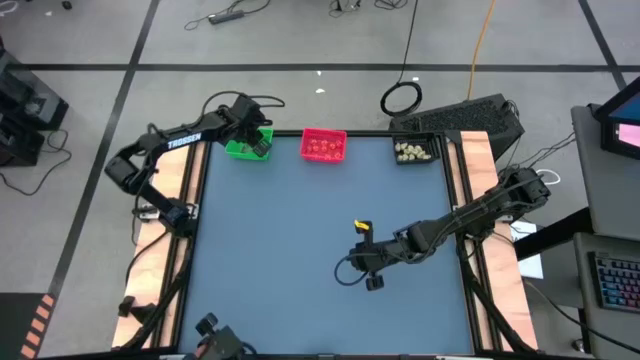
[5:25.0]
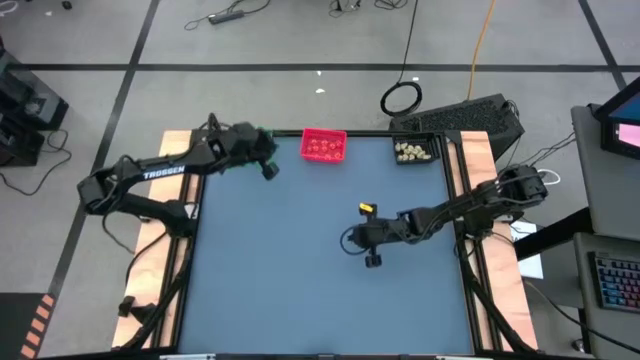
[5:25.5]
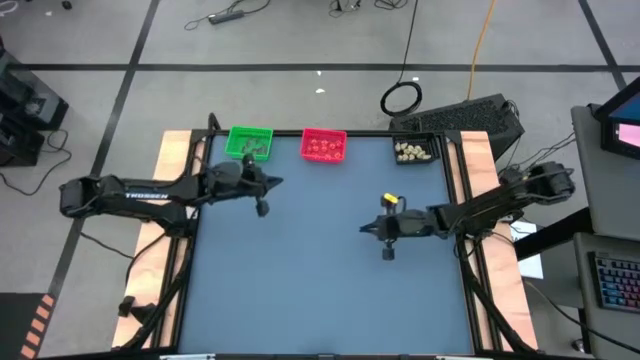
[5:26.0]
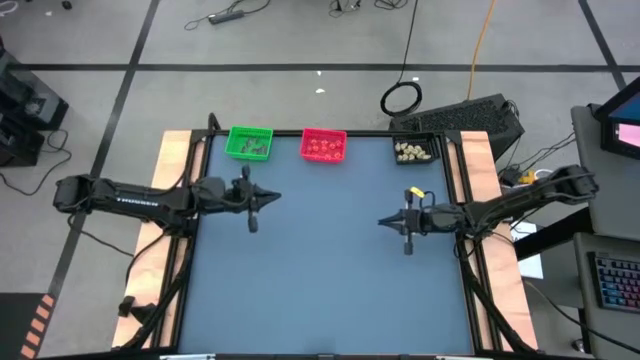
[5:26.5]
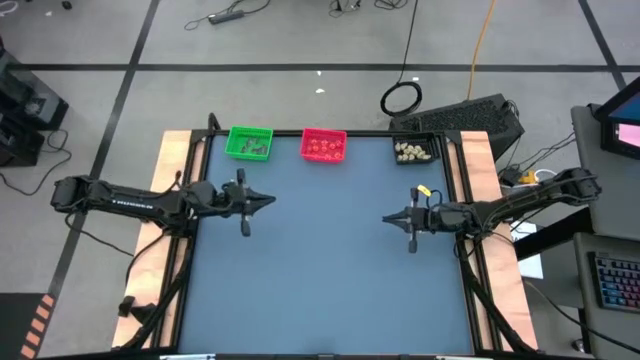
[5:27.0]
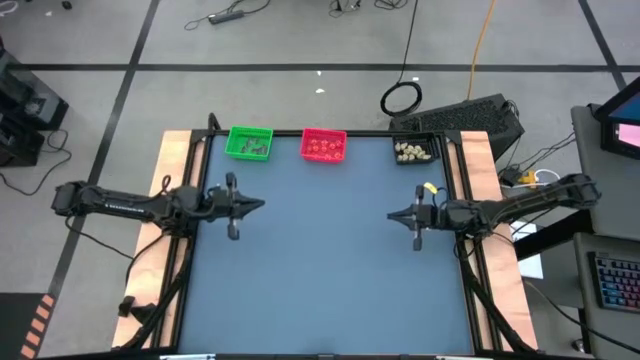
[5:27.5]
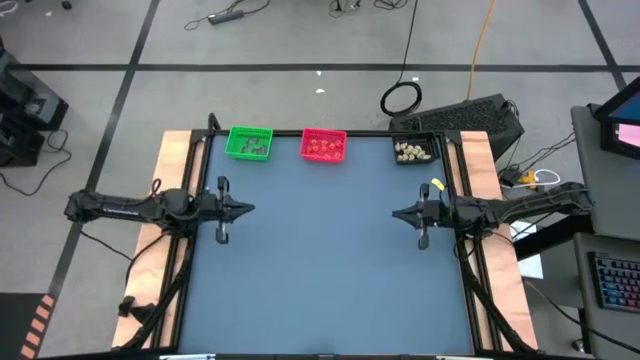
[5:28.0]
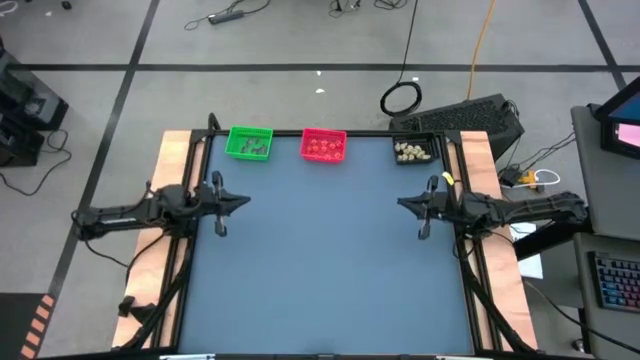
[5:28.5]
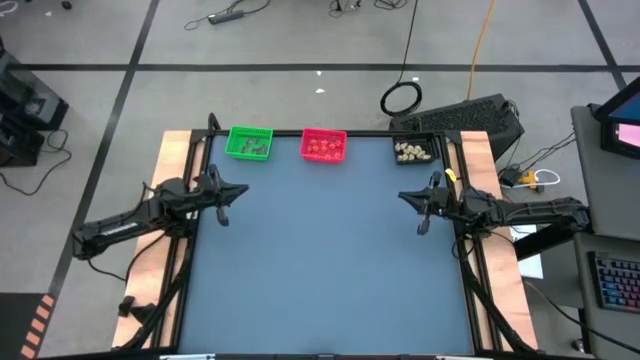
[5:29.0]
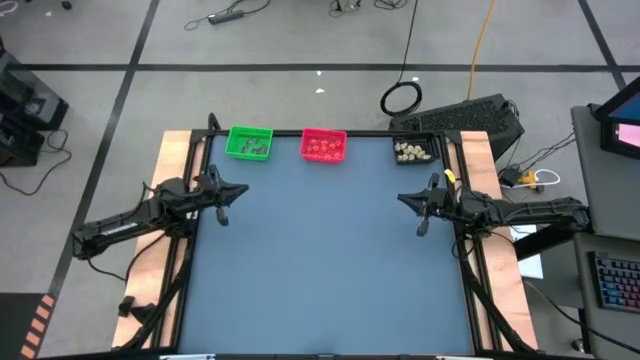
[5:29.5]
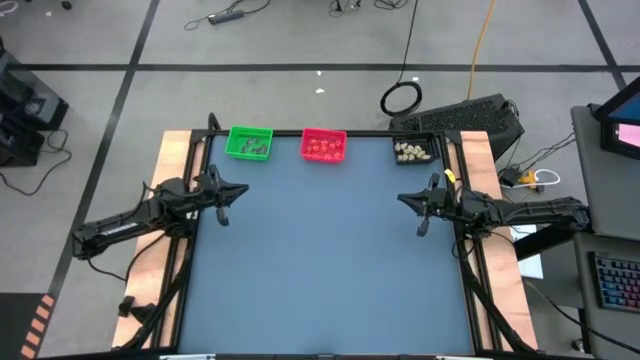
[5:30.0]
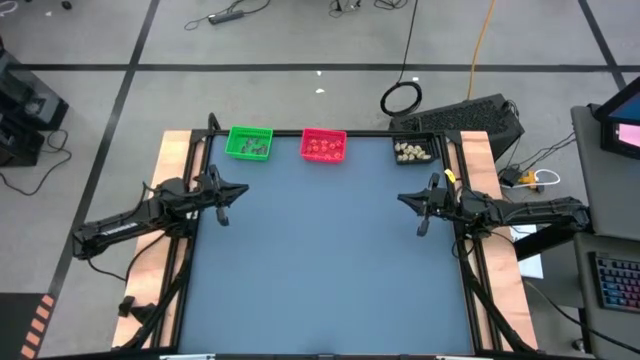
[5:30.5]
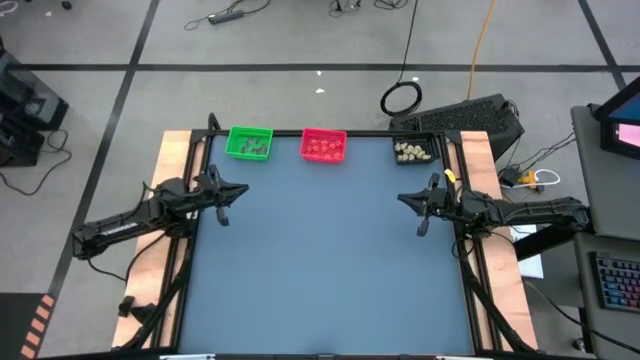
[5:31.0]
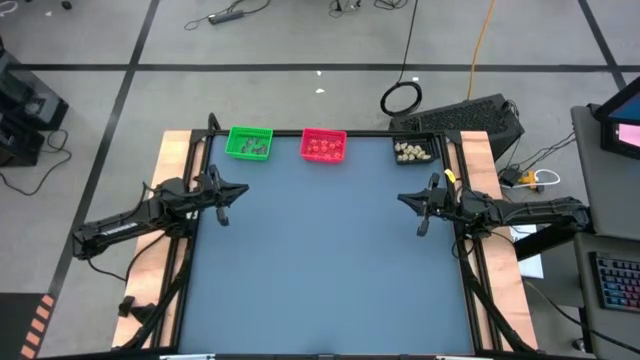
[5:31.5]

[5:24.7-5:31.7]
Task: Sort Halloween decoration
Return to Home Position

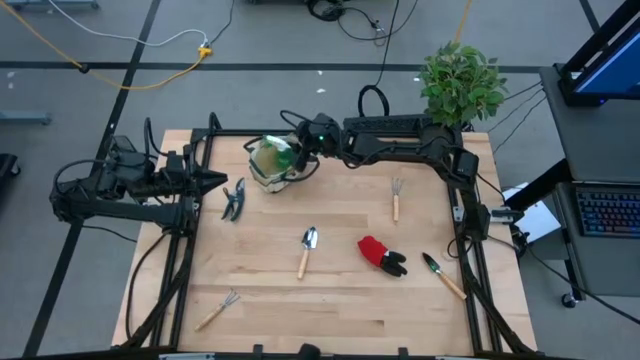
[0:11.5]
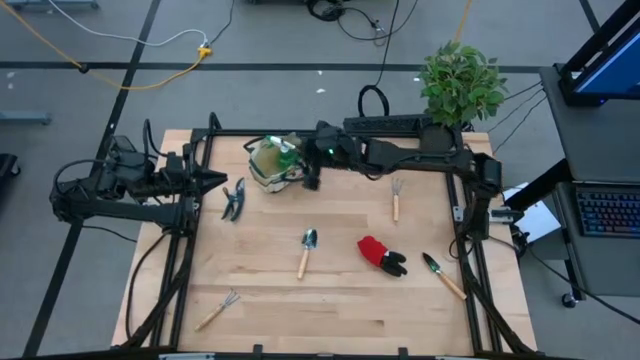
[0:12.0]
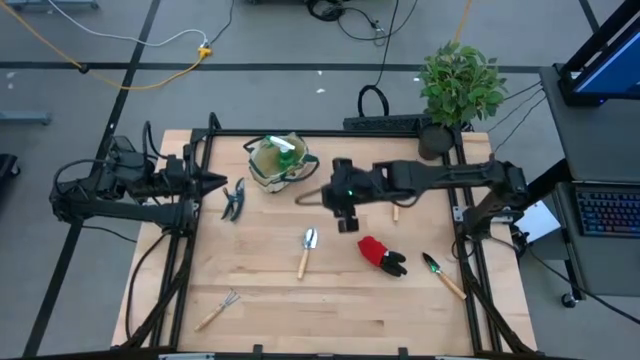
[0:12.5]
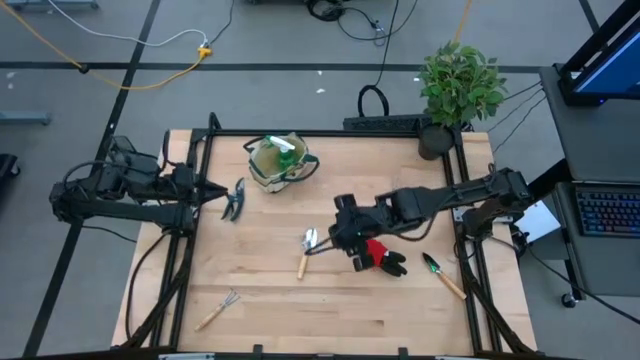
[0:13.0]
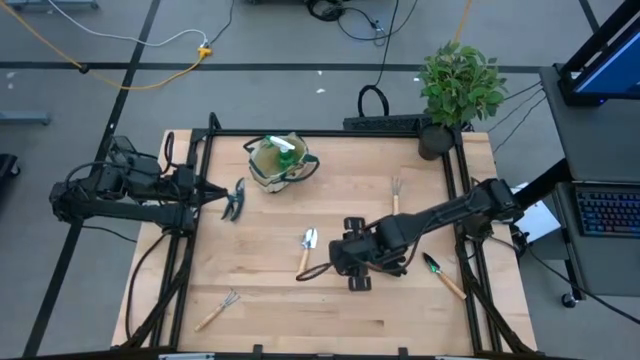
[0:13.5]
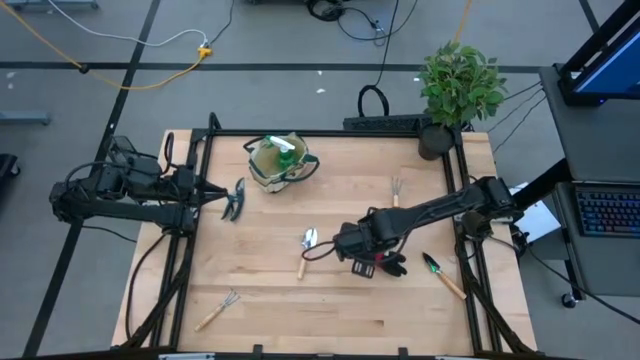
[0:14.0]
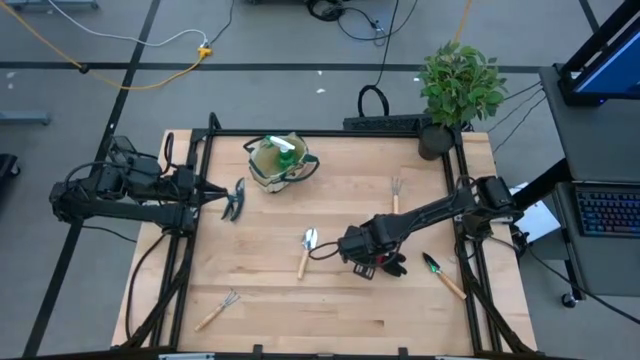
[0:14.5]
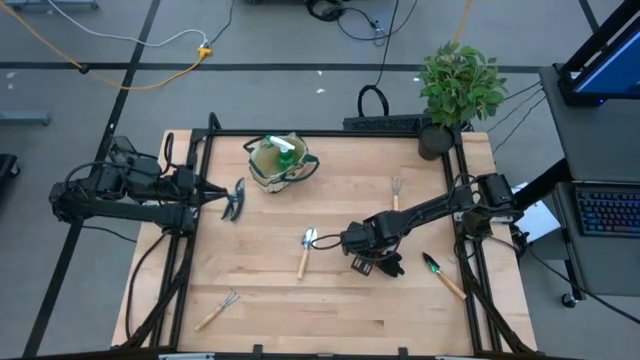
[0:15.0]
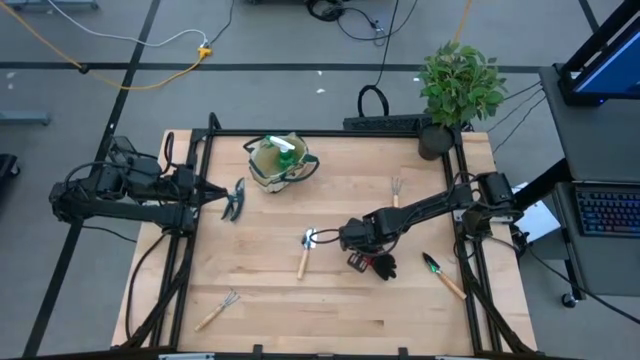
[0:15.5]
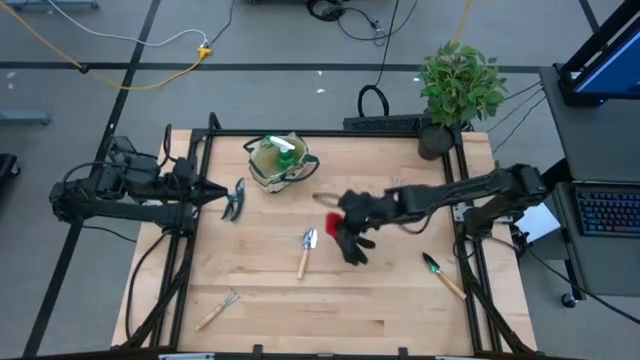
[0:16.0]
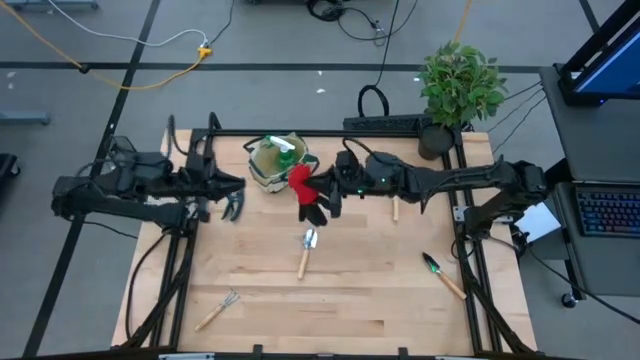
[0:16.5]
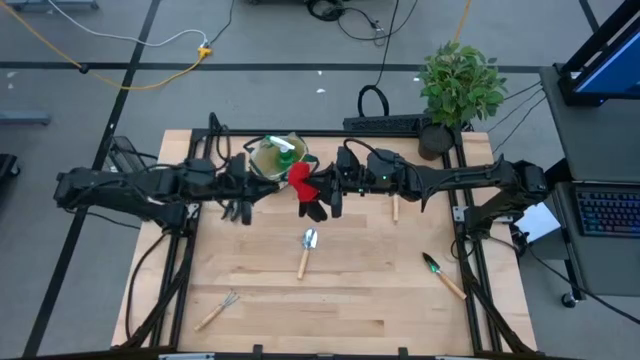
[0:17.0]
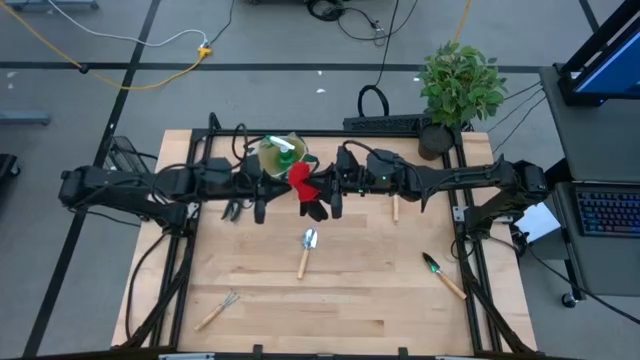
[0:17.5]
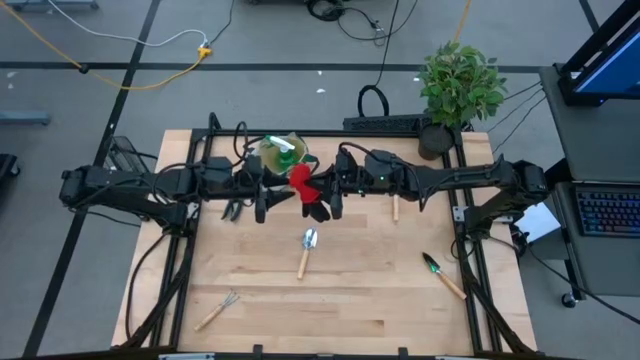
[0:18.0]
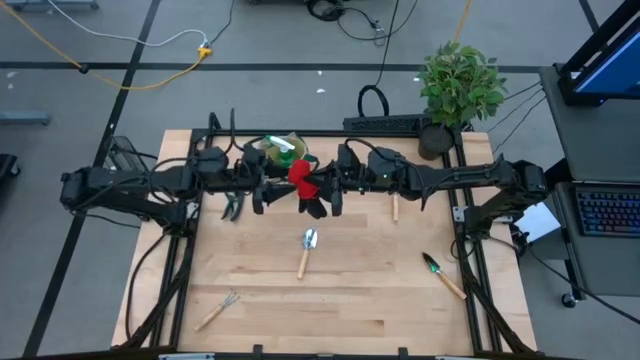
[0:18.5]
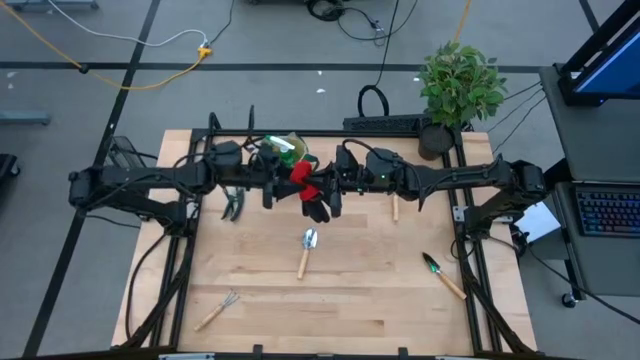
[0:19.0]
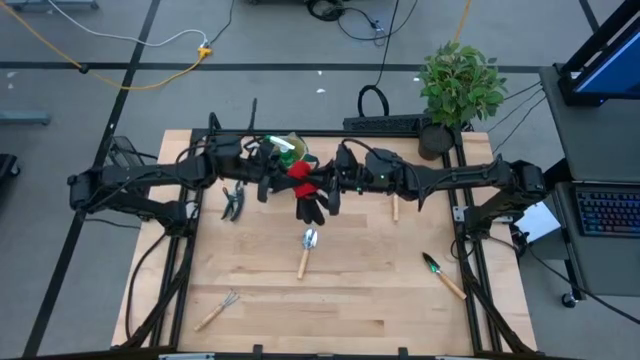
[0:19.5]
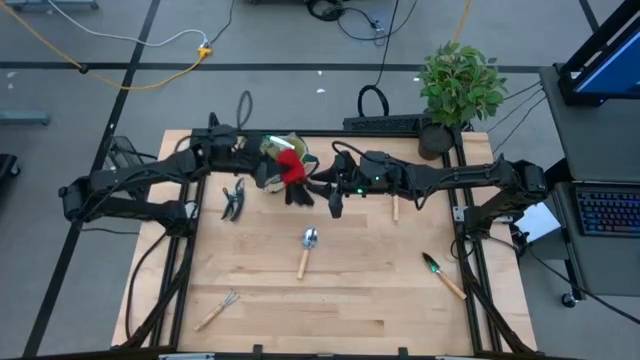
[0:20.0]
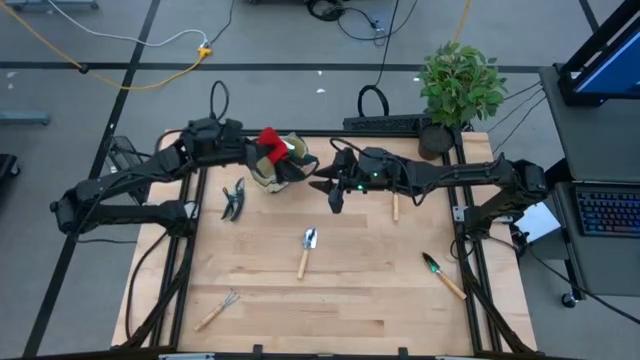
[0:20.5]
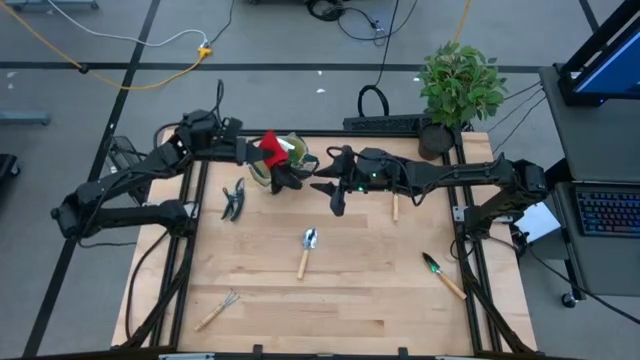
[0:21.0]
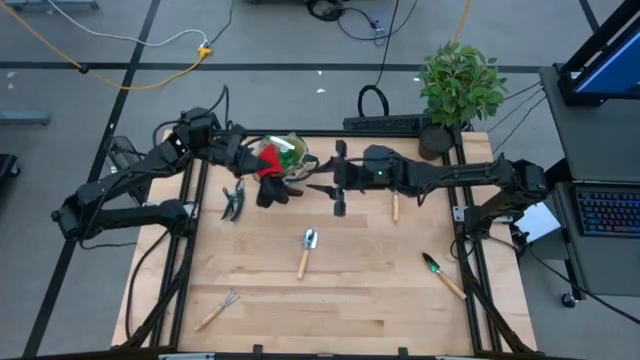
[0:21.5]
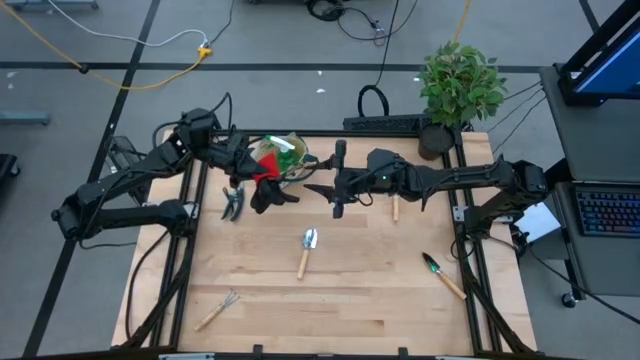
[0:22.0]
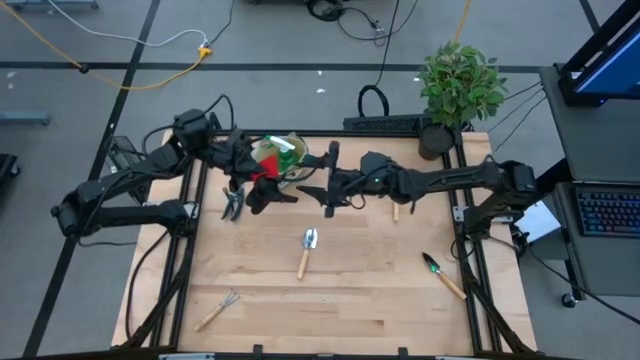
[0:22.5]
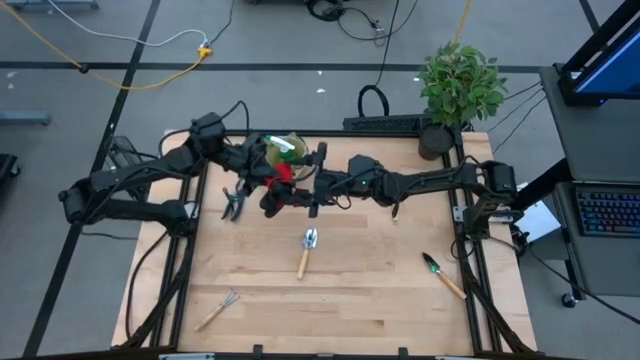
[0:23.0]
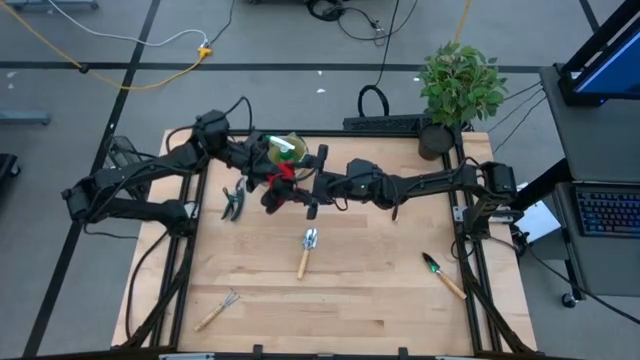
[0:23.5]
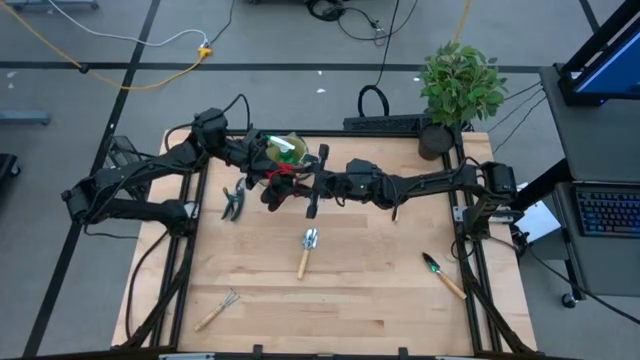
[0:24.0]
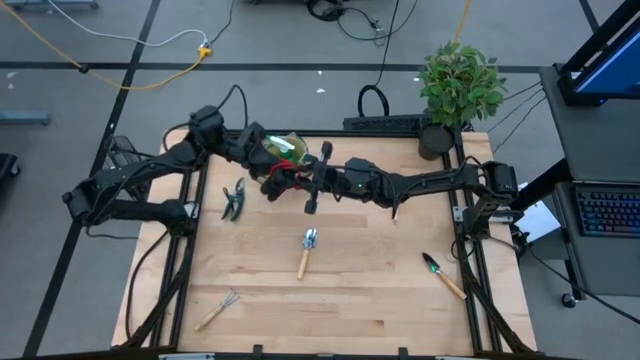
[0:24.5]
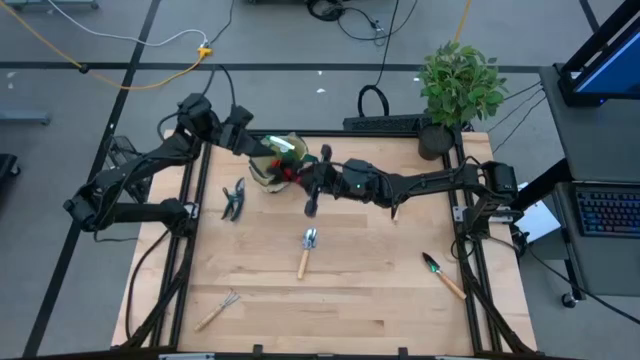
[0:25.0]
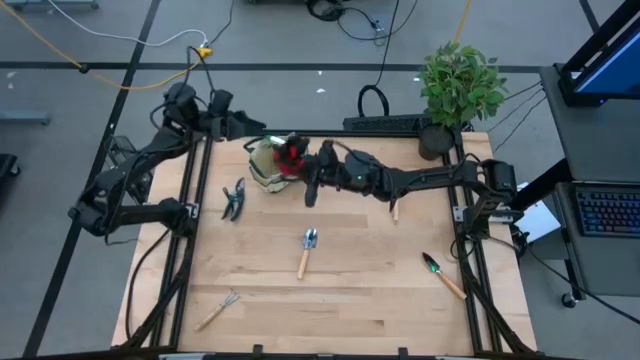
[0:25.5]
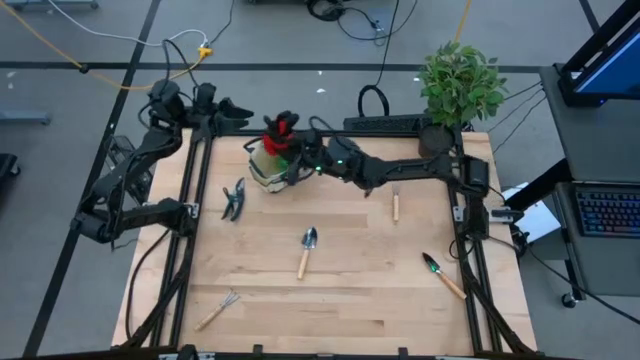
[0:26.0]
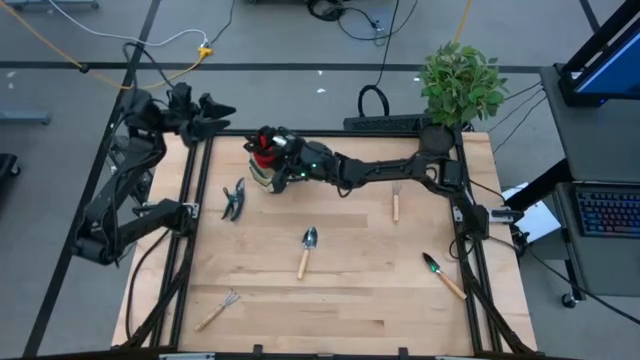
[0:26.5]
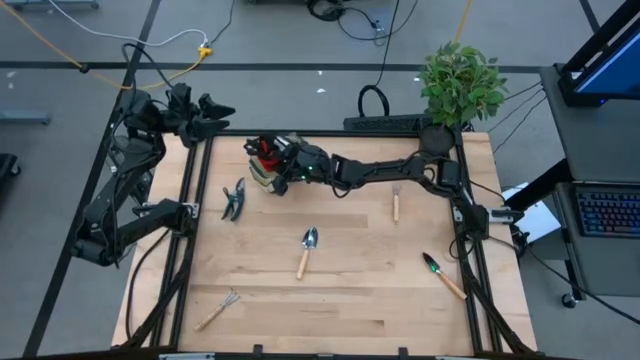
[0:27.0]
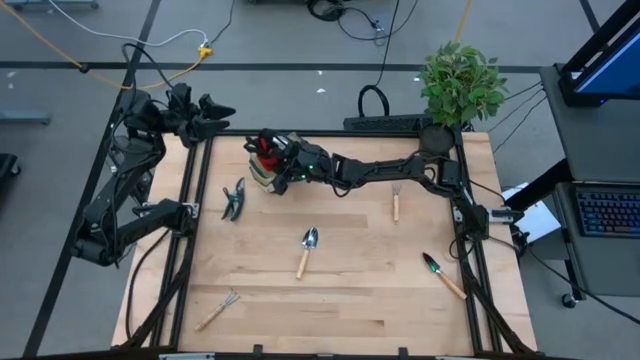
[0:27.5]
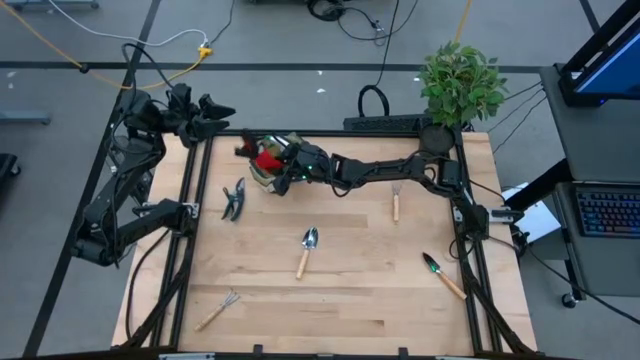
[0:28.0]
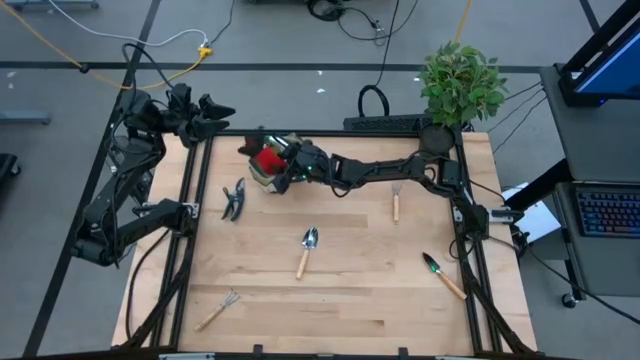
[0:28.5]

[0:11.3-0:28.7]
Task: Pick & Place Garden tools in Gardening bag
Put the gardening gloves into the gardening bag
